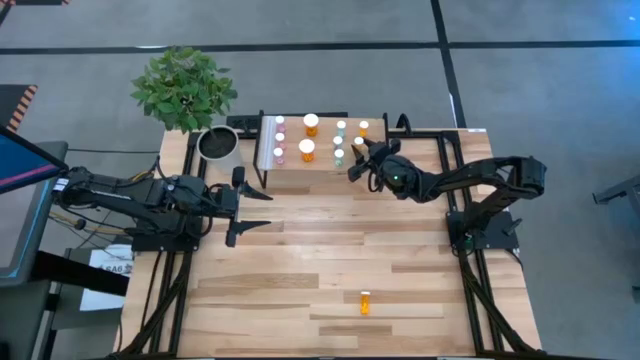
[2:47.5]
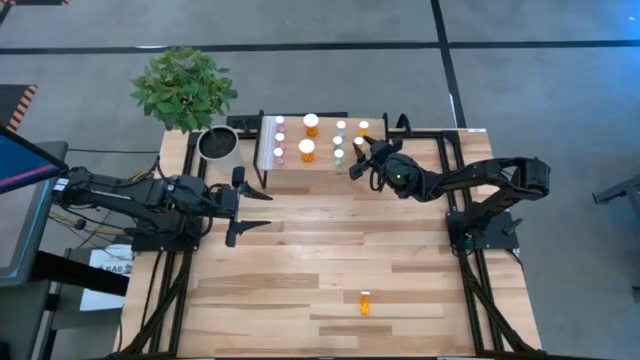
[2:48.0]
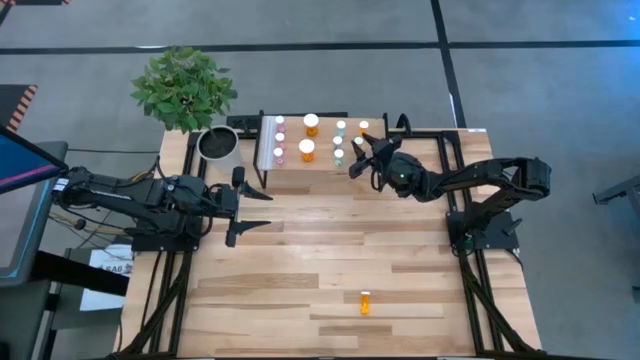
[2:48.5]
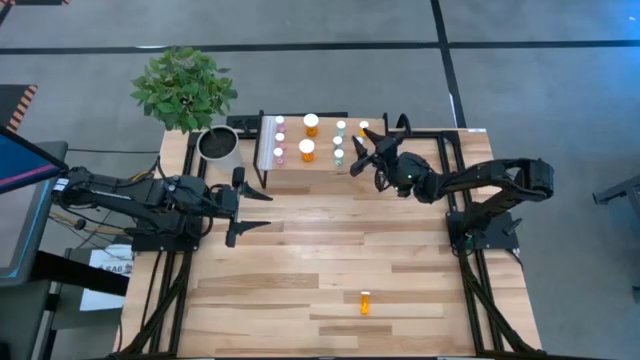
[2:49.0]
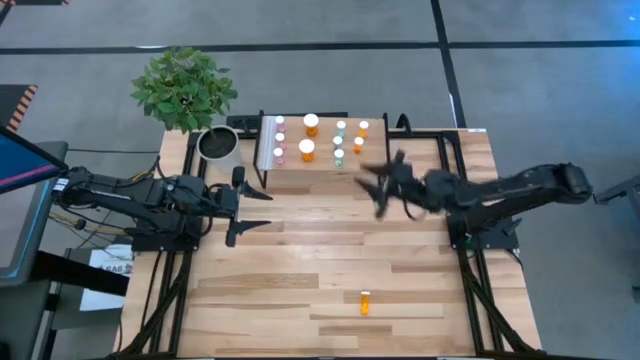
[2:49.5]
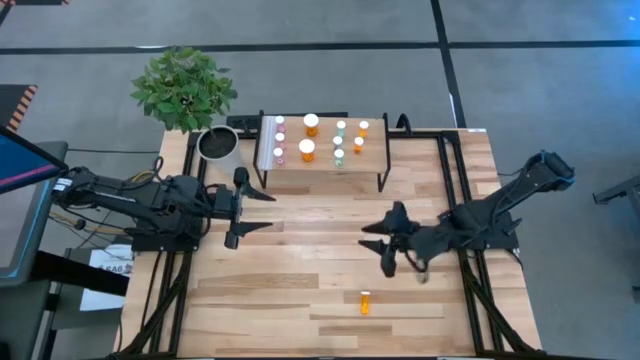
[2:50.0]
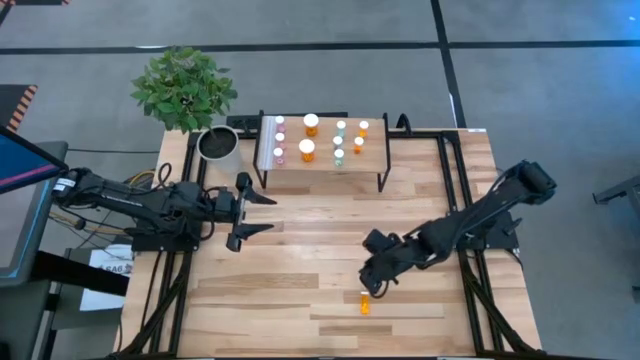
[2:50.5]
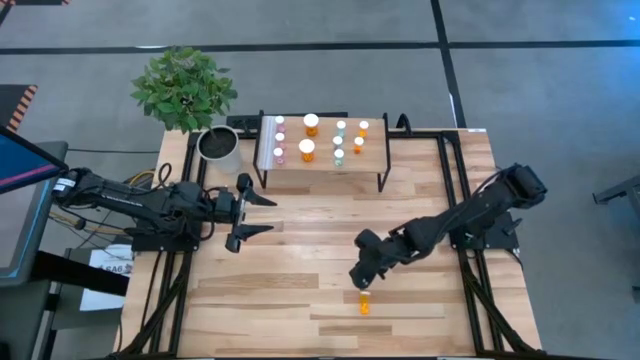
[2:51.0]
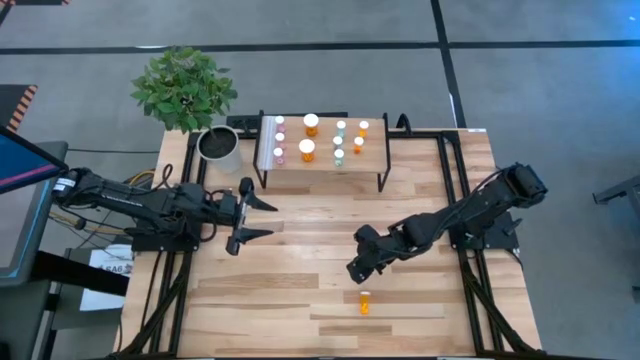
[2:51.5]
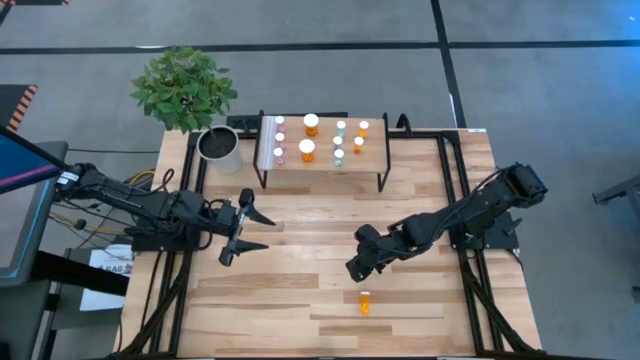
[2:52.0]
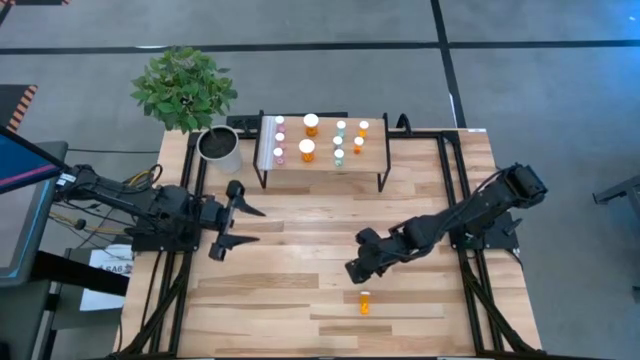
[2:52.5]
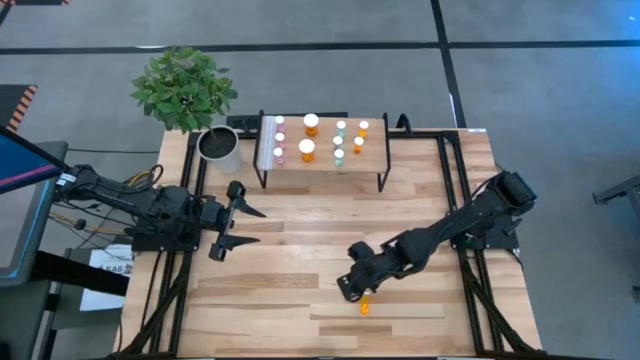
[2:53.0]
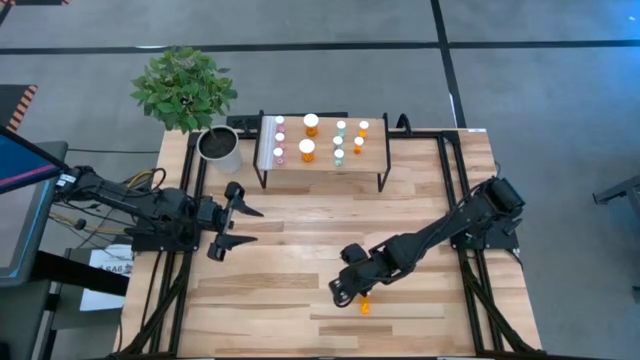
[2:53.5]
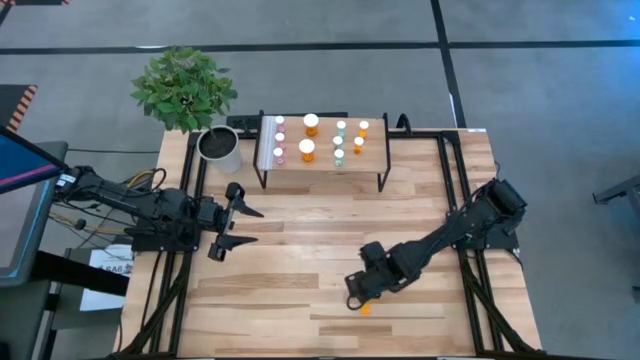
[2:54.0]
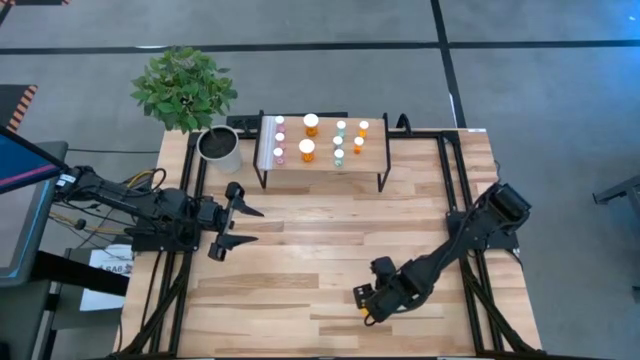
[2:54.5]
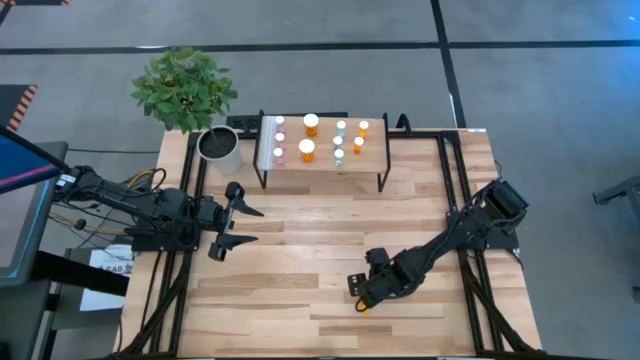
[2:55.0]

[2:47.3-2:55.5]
Task: Pick and place medicine bottles onto shelf by color
Put the small orange pill bottle on the shelf aligned with the other small orange pill bottle

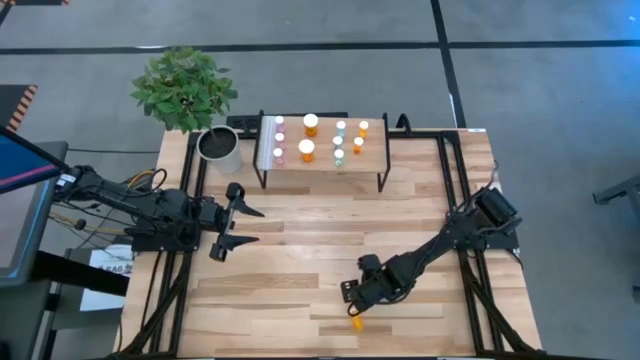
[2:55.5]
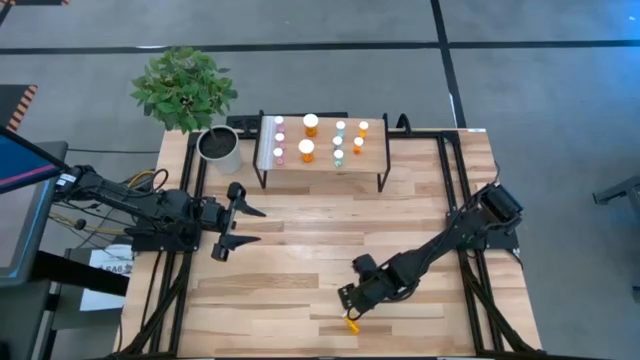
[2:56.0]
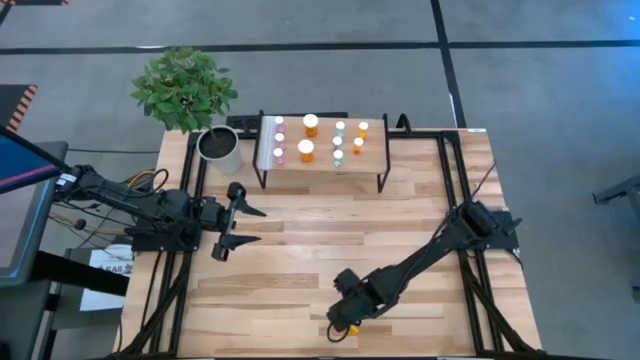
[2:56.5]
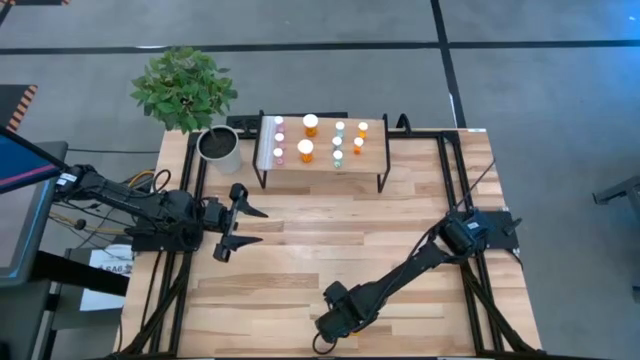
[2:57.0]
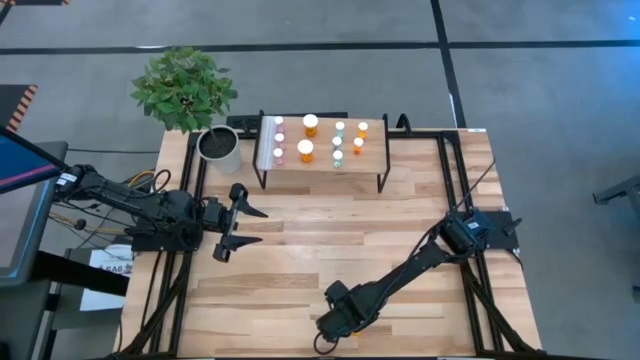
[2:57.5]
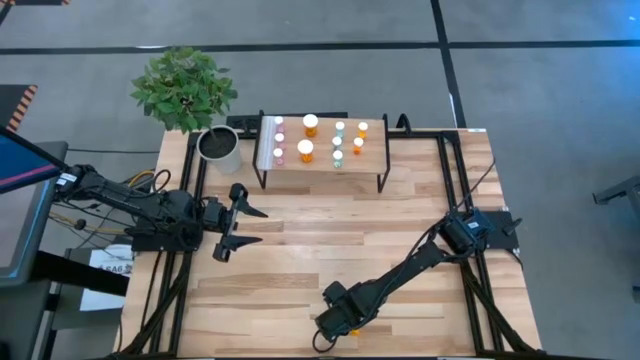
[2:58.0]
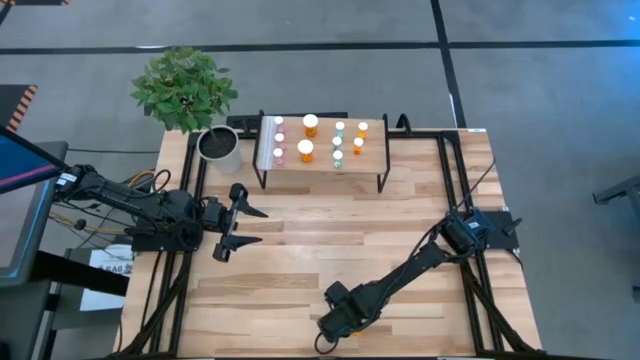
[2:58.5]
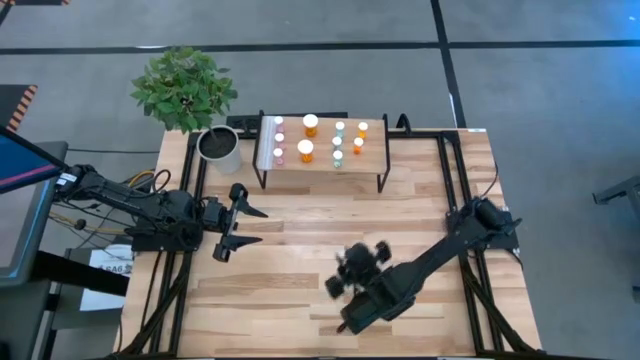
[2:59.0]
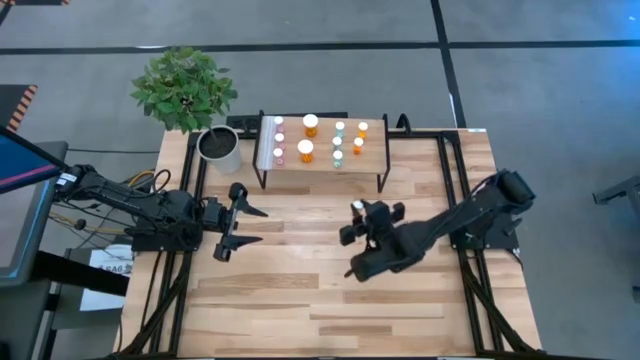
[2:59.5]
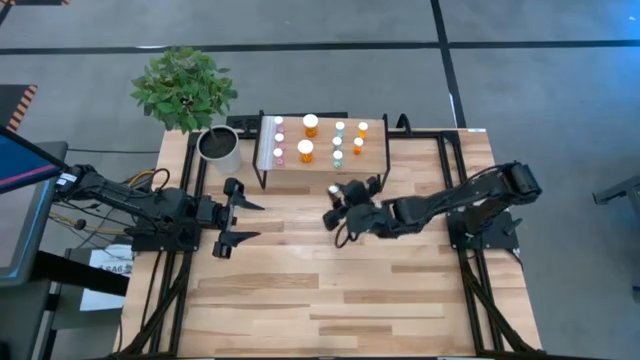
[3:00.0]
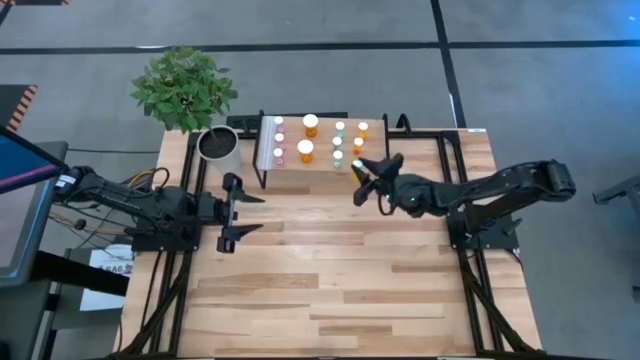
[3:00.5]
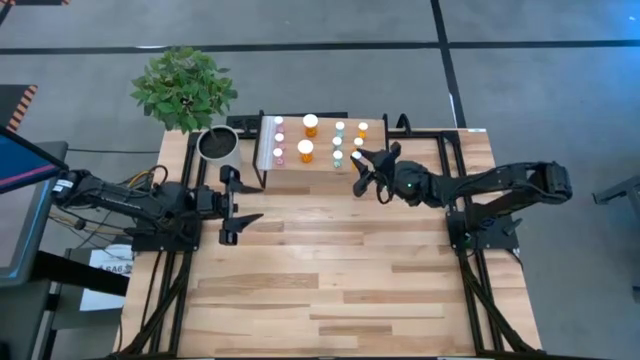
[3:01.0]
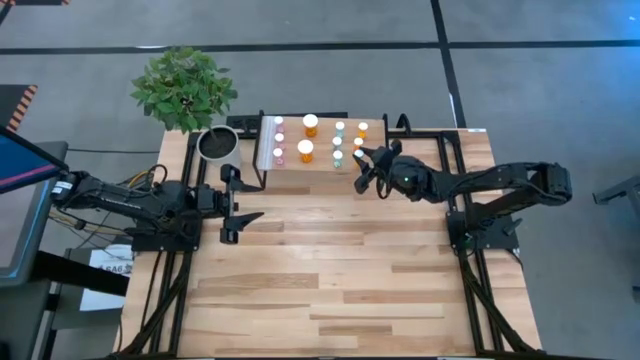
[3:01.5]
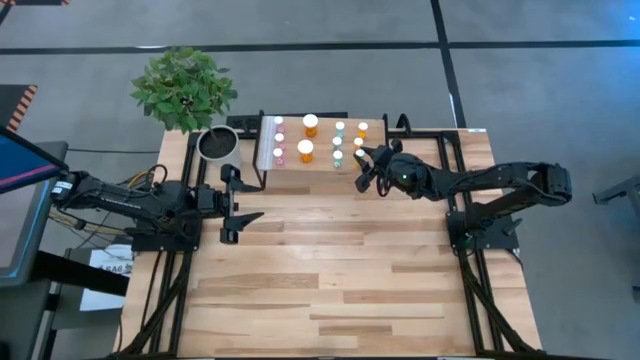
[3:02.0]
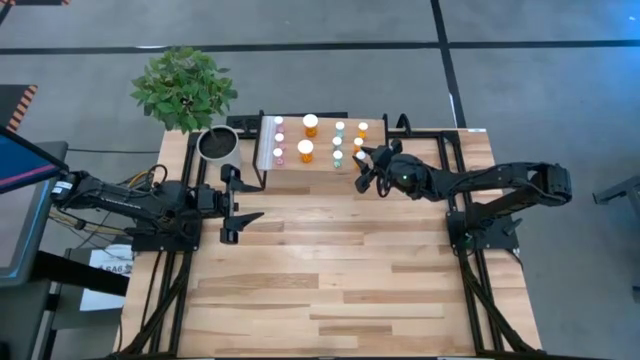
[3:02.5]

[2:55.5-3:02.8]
Put the small orange pill bottle on the shelf aligned with the other small orange pill bottle

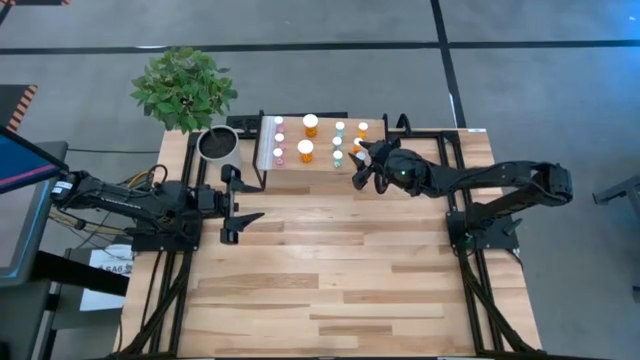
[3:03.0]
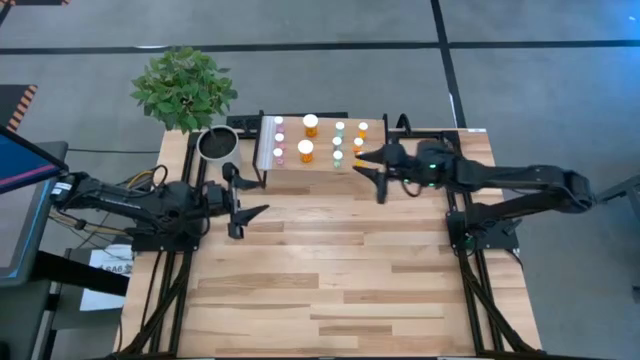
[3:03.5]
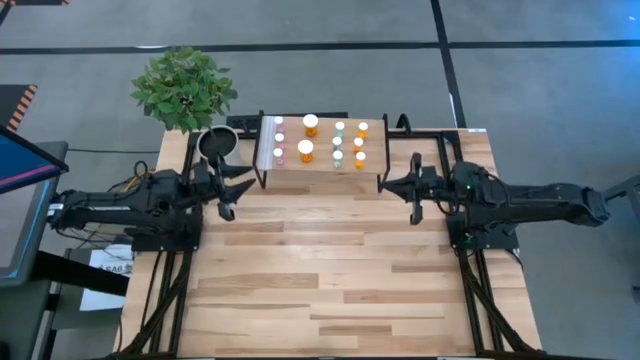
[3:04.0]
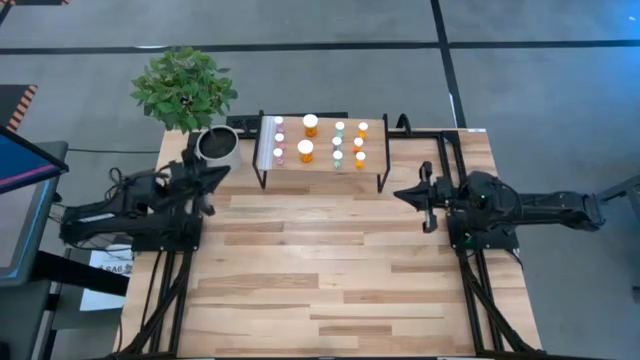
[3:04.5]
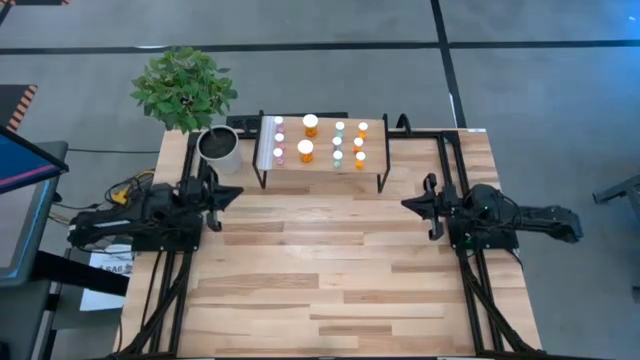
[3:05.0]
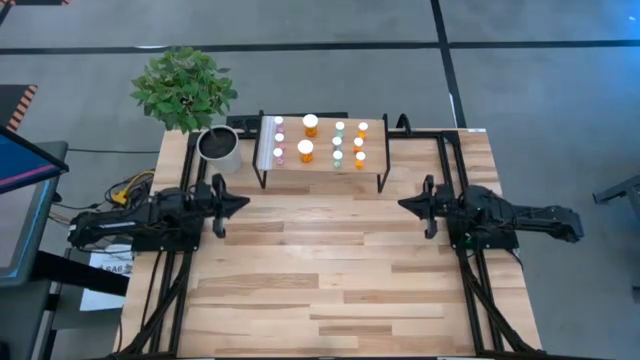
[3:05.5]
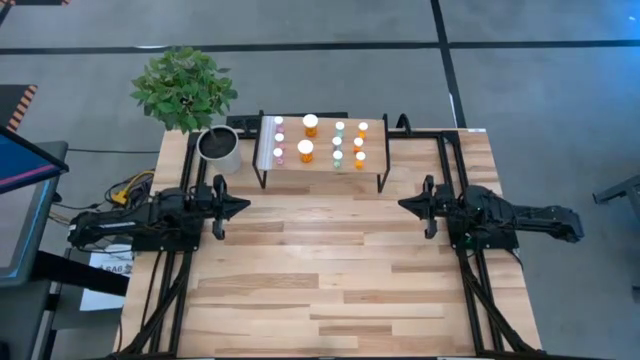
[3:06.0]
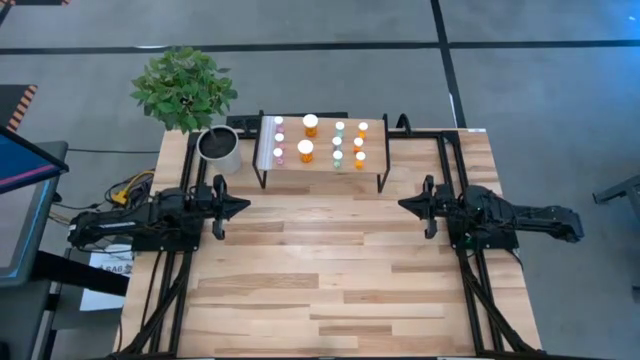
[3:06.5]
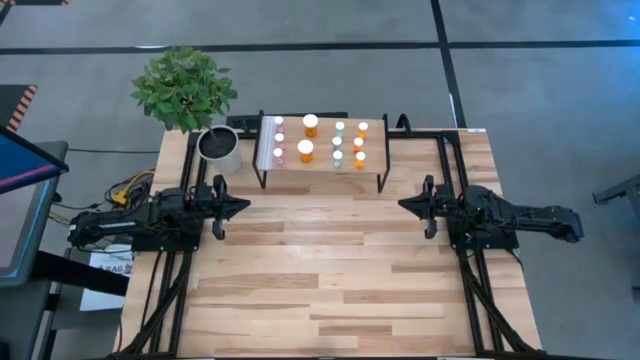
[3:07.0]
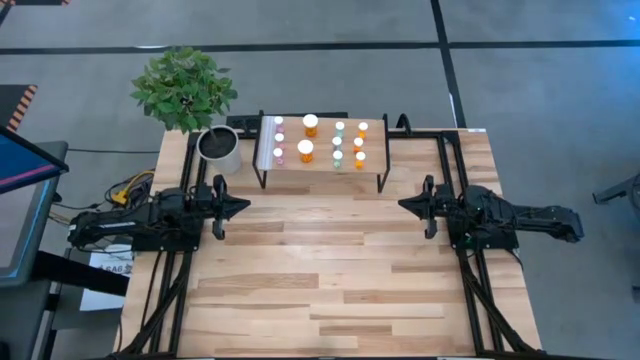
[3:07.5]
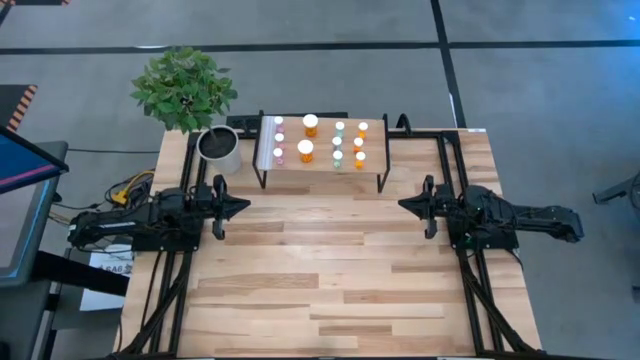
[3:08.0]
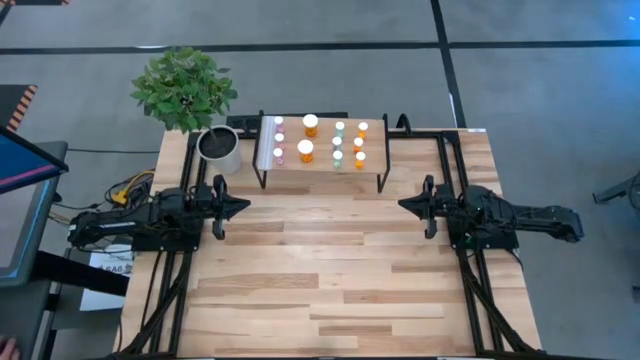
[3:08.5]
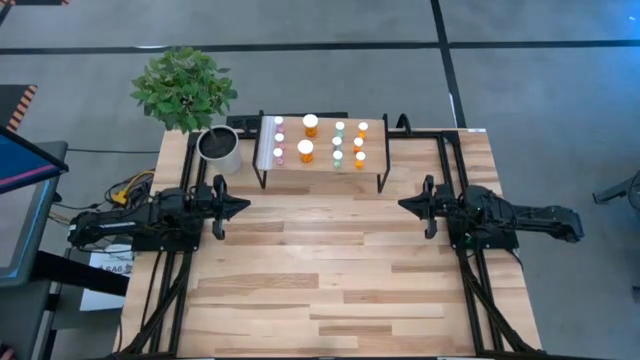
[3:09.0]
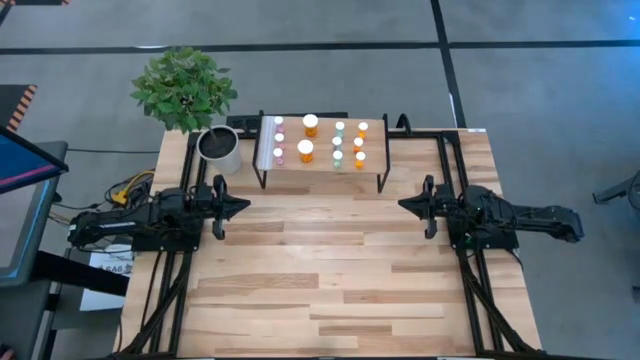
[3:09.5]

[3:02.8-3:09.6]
Return to Home Position
